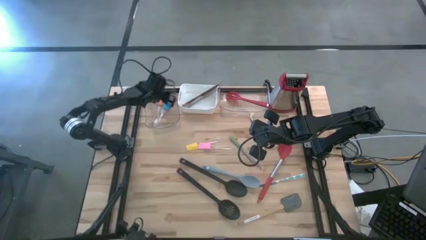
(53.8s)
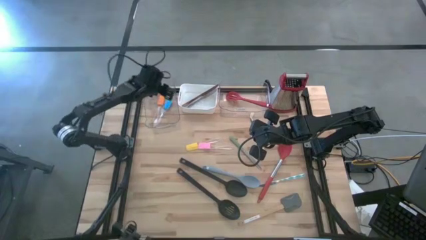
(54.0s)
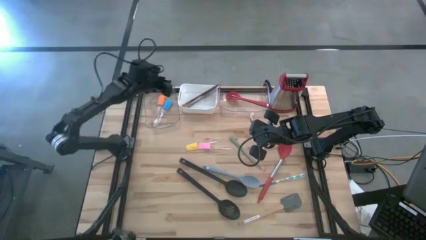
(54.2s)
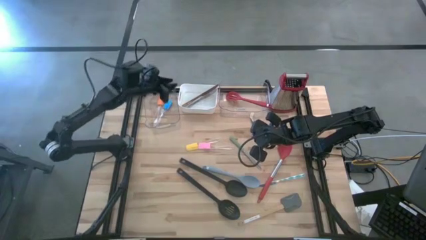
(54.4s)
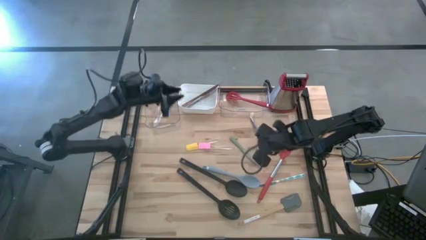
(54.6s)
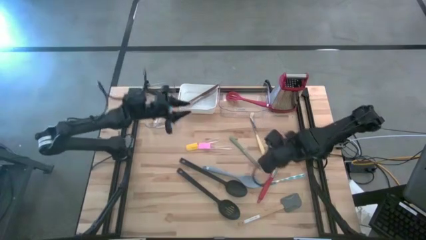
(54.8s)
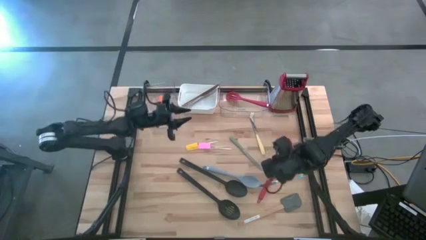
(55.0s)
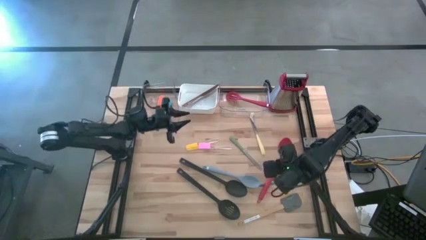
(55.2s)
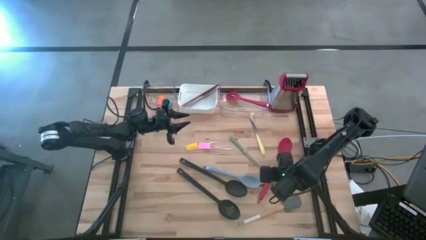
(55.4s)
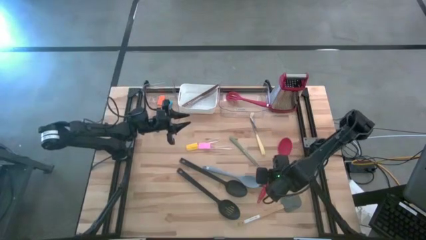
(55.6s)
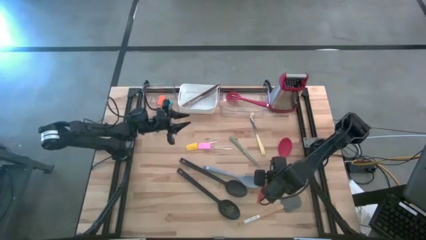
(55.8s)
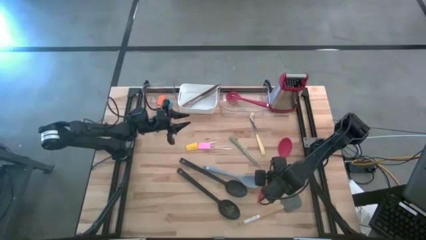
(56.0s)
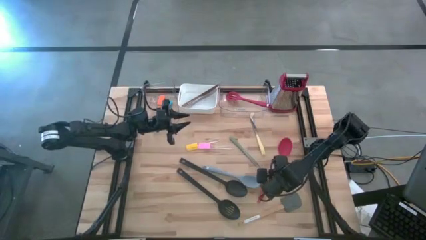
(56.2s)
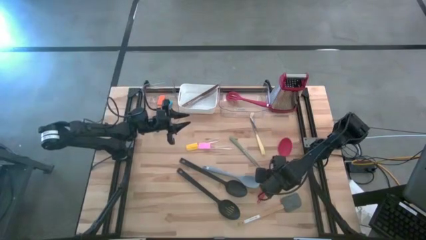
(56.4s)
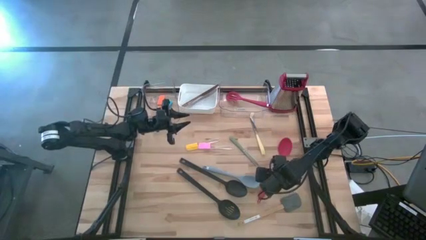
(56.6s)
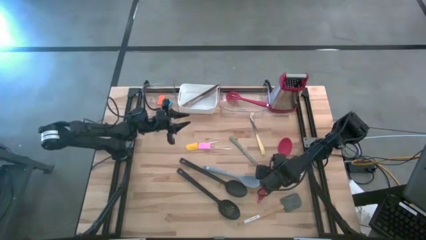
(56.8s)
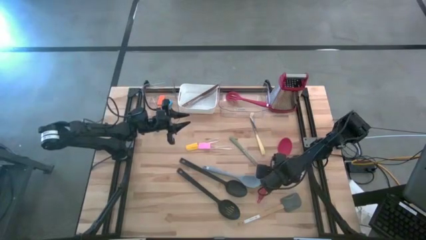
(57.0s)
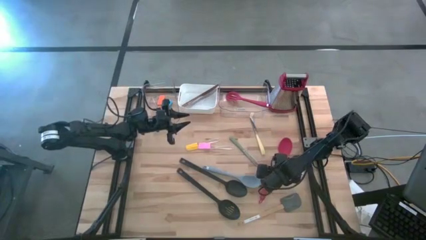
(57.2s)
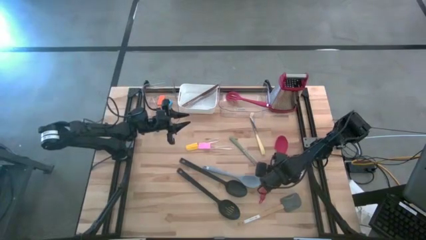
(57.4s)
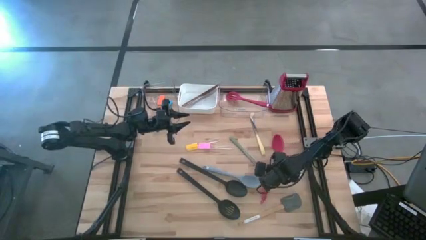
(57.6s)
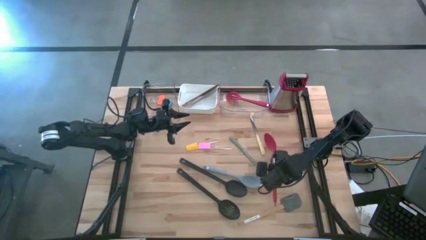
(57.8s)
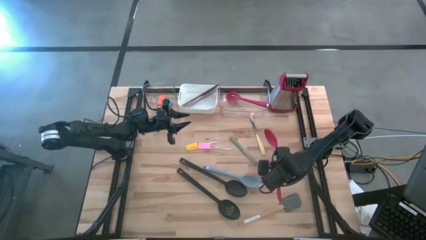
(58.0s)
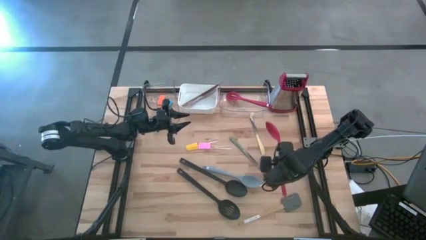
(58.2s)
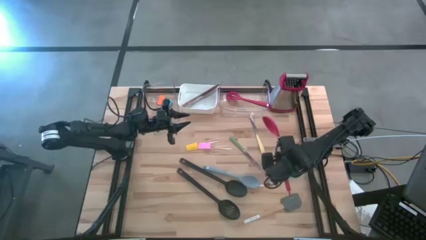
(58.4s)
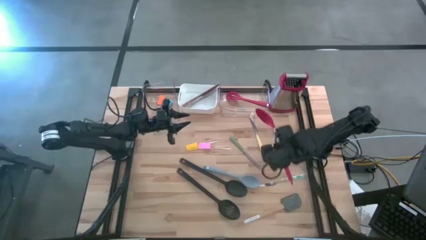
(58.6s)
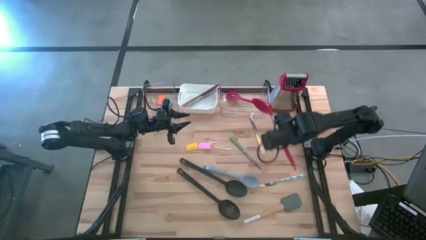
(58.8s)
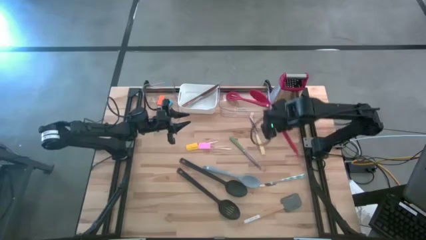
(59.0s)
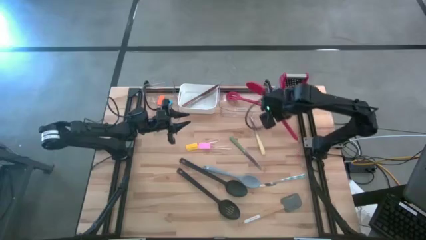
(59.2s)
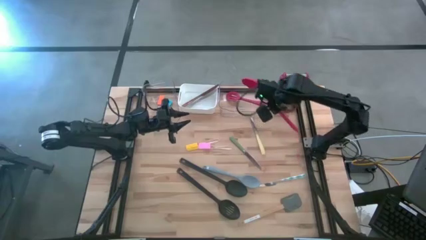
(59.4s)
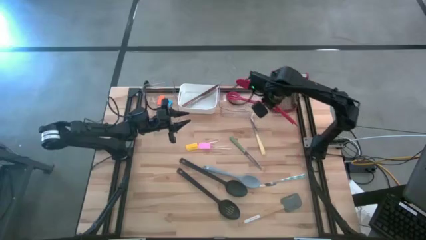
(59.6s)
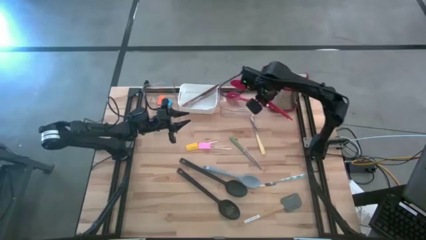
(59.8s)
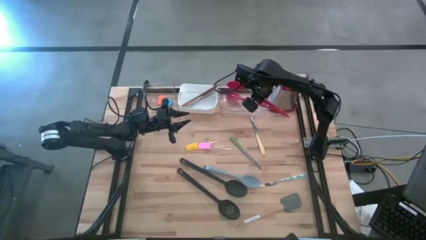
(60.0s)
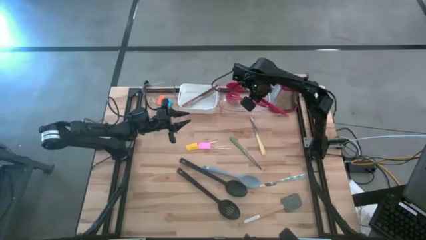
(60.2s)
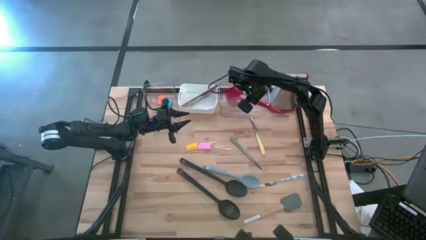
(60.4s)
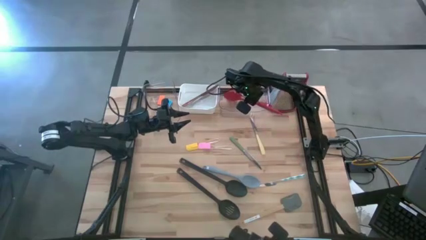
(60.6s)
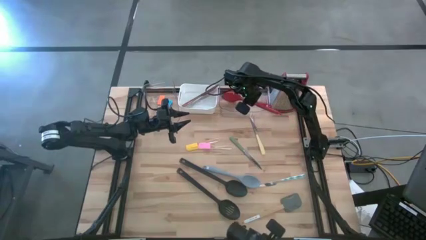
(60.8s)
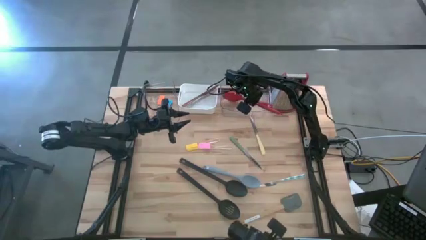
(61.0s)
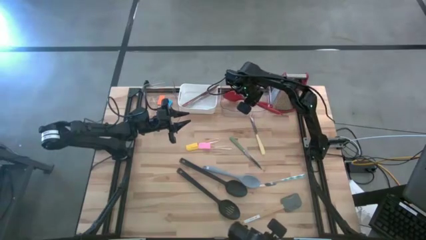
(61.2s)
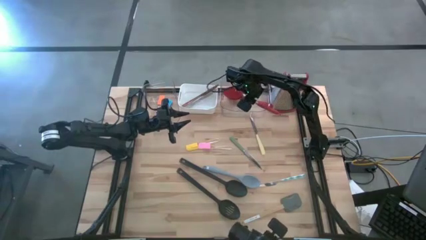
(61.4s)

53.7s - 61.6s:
Task: Pick & Place Kitchen Items
Put the red serving spoon into the right transparent bin

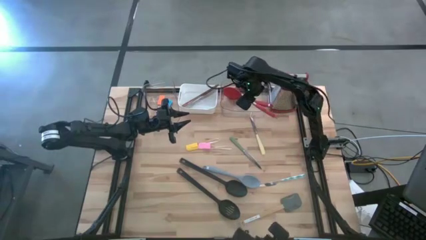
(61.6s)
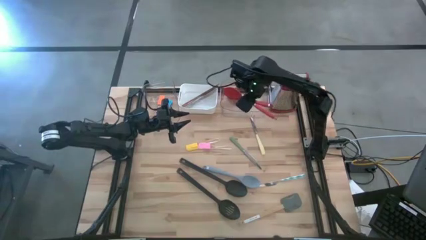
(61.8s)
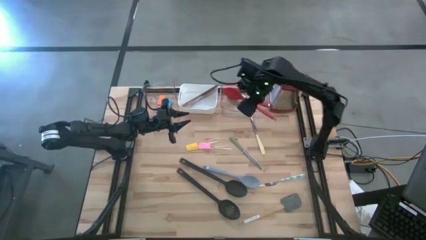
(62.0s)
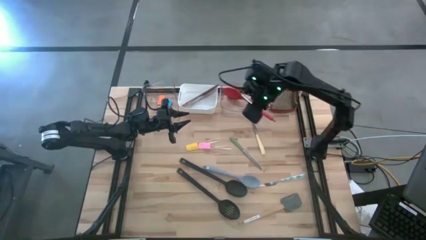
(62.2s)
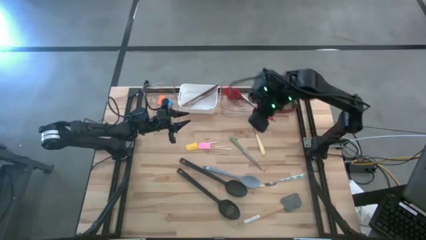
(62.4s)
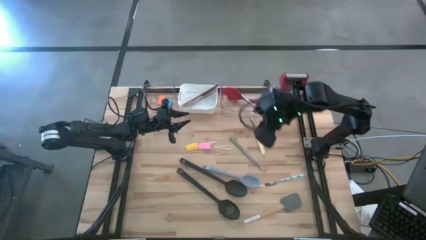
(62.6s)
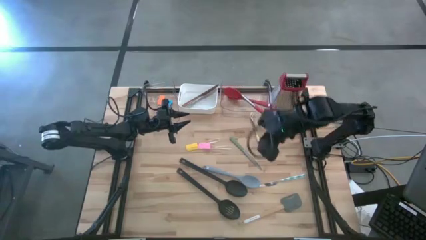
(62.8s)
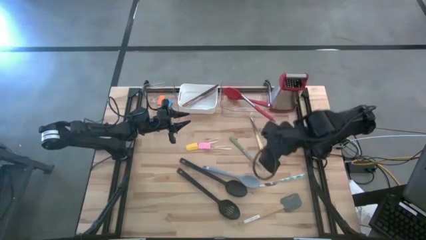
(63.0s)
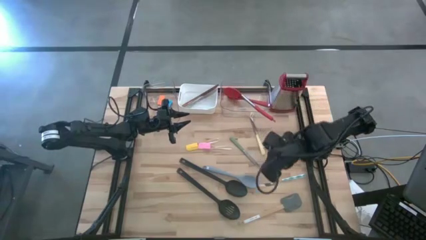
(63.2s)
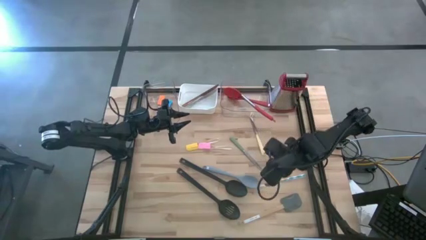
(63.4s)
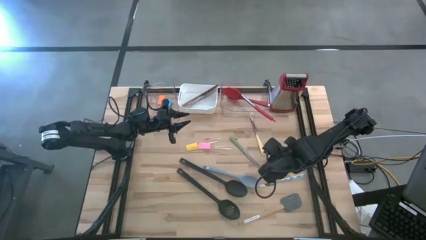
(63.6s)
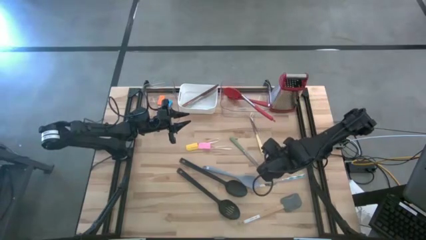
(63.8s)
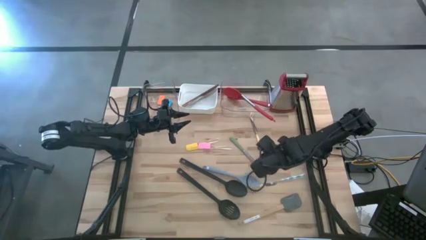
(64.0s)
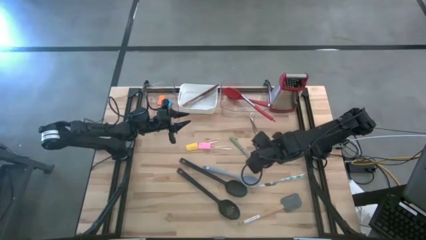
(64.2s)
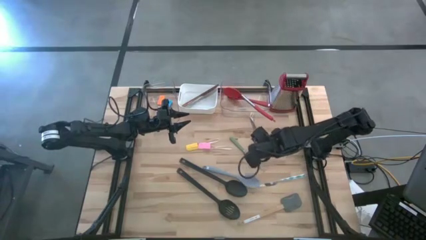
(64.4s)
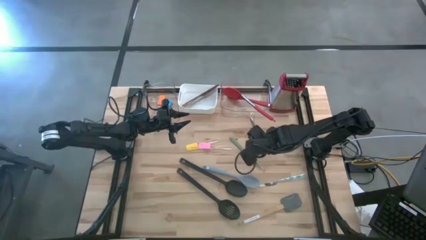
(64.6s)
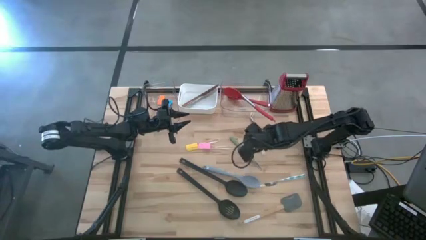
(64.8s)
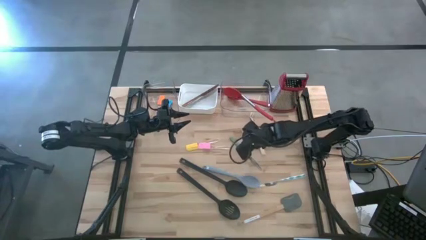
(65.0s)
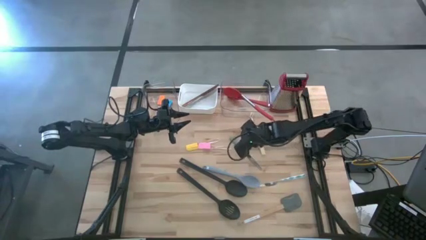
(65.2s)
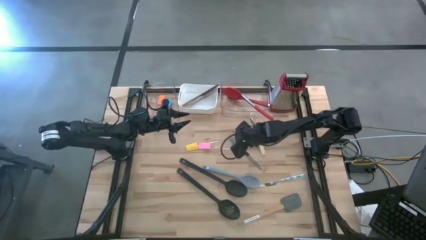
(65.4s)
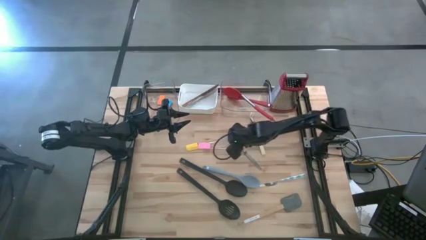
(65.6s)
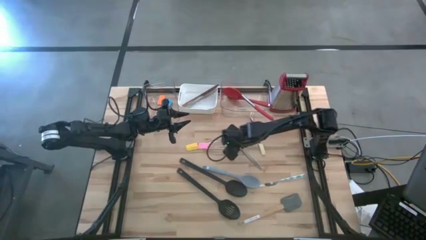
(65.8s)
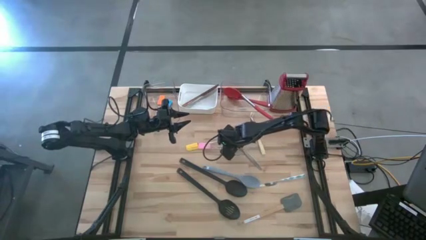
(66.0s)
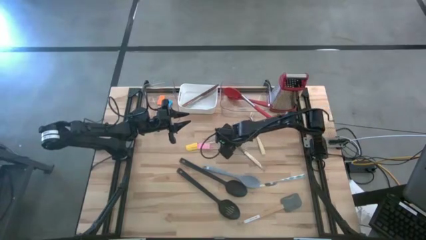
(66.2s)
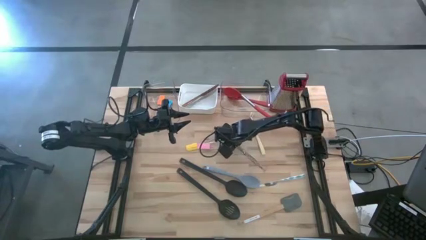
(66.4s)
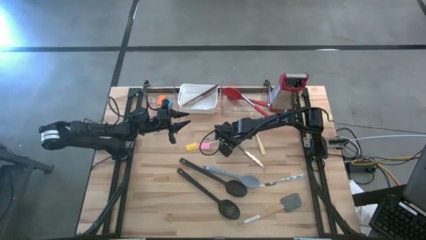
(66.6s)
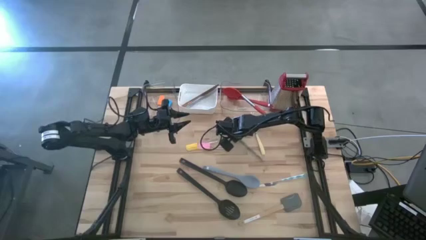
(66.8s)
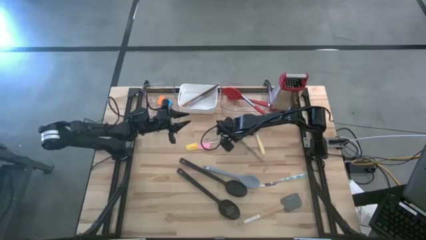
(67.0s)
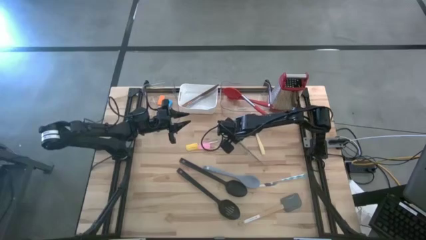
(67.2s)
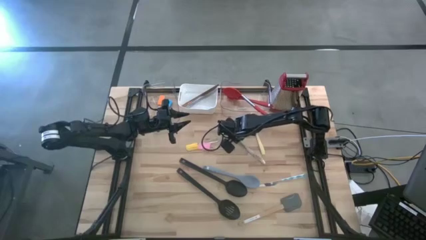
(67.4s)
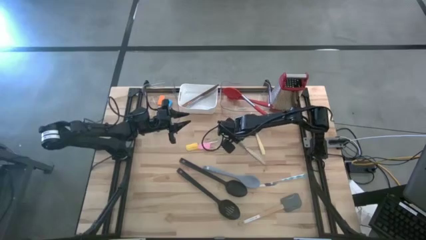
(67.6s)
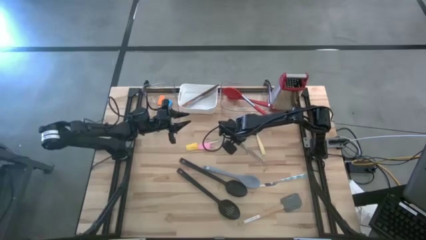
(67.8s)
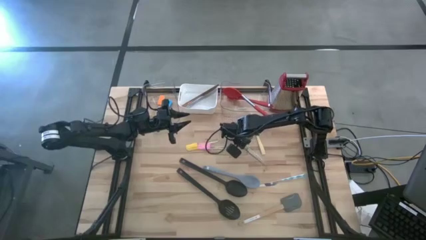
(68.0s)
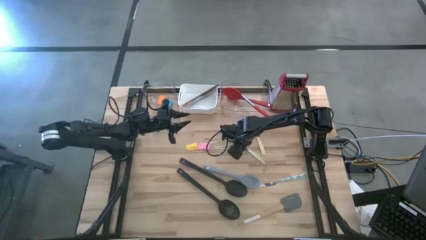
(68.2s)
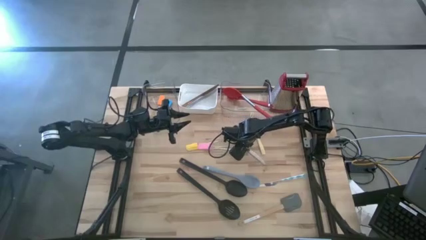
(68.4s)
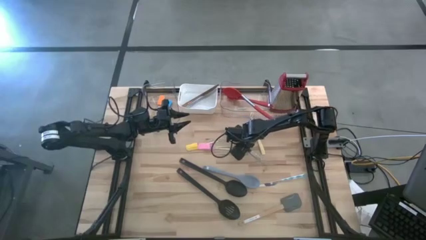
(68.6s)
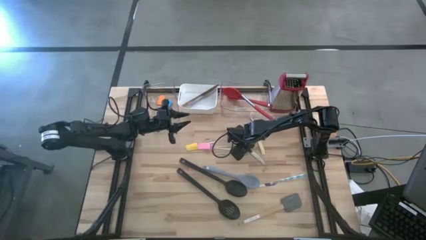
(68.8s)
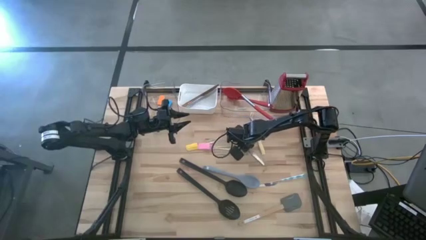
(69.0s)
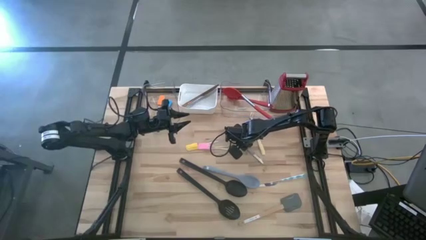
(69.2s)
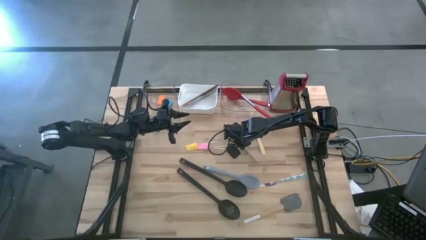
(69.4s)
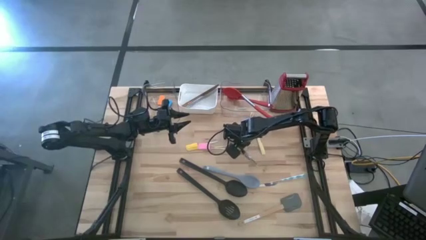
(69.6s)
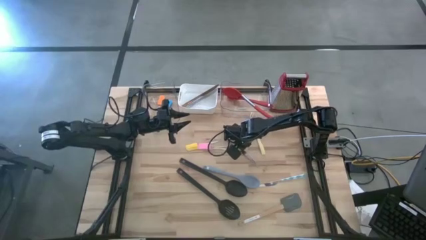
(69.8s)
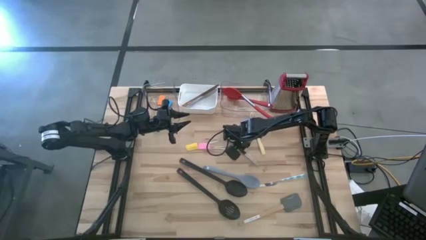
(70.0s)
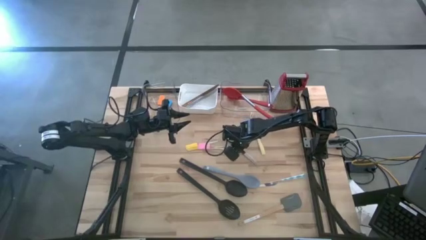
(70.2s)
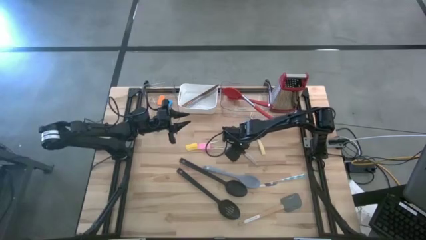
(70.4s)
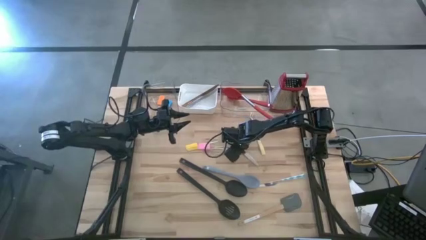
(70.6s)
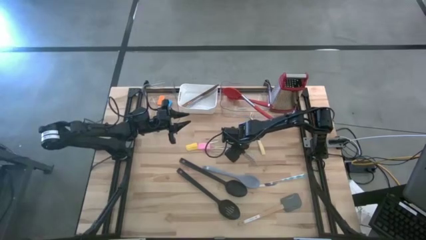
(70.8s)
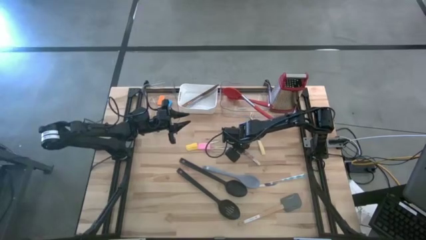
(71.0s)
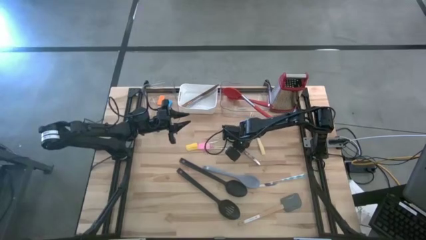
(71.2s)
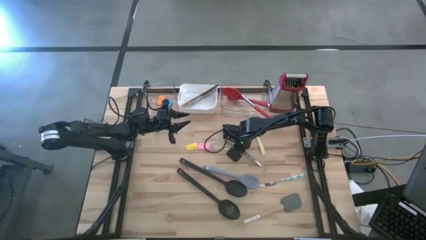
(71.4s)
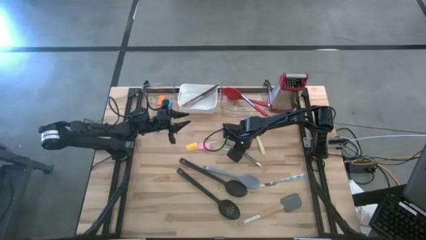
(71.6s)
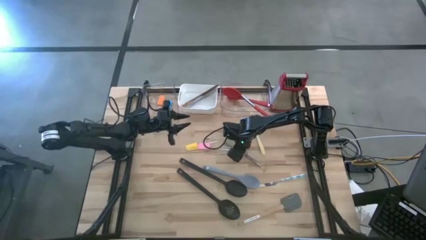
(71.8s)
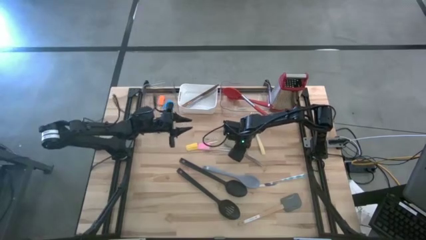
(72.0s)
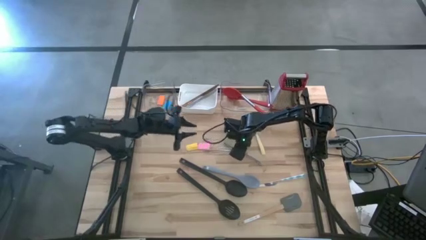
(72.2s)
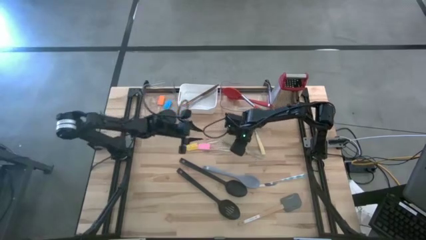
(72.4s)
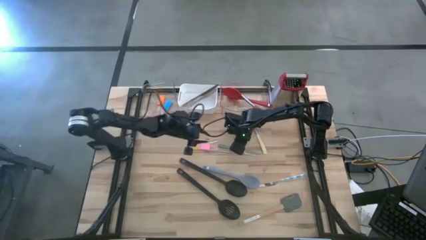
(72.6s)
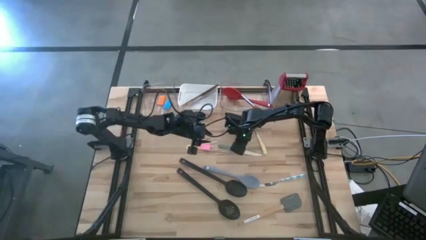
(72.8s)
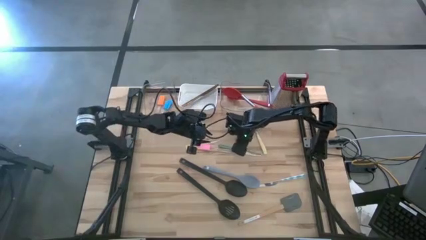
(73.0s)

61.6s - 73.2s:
Put the green knife into the white bin
